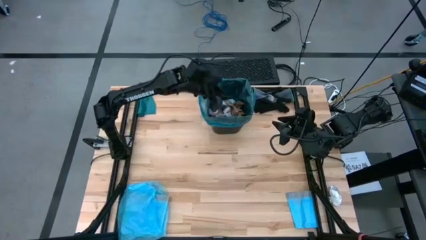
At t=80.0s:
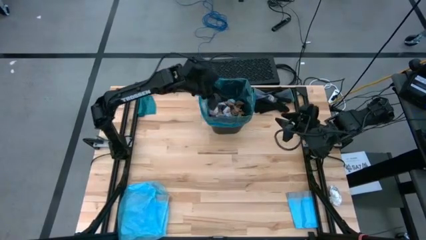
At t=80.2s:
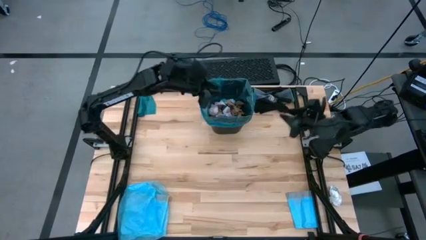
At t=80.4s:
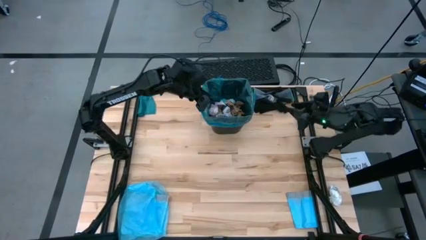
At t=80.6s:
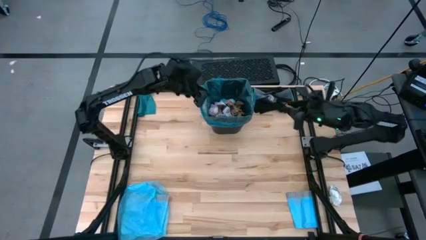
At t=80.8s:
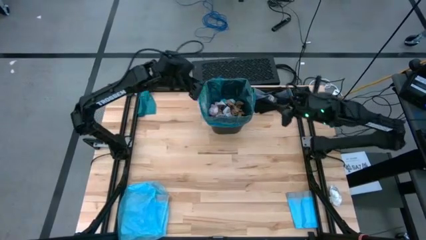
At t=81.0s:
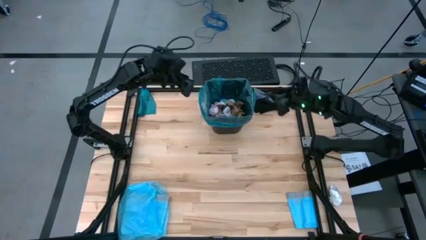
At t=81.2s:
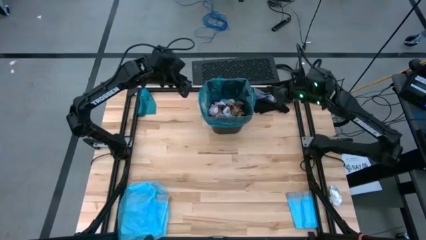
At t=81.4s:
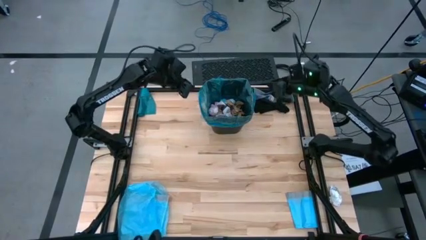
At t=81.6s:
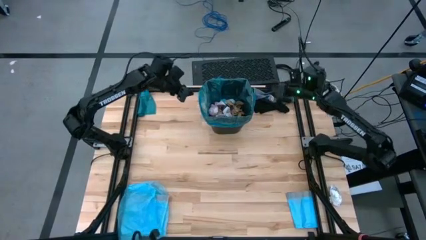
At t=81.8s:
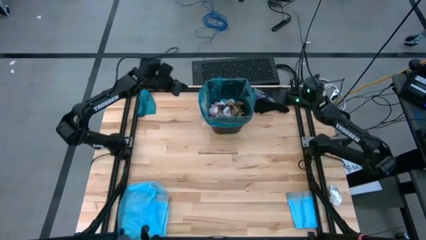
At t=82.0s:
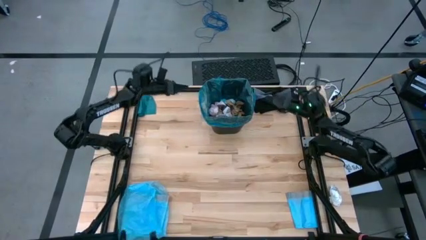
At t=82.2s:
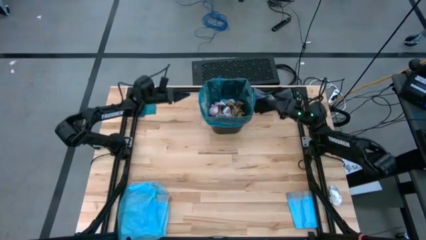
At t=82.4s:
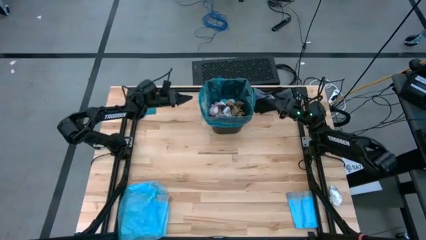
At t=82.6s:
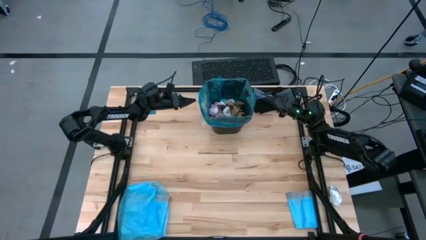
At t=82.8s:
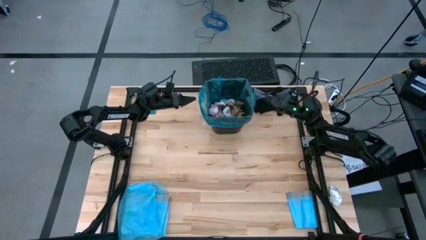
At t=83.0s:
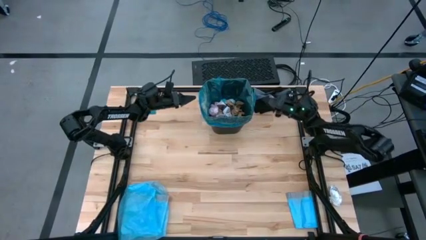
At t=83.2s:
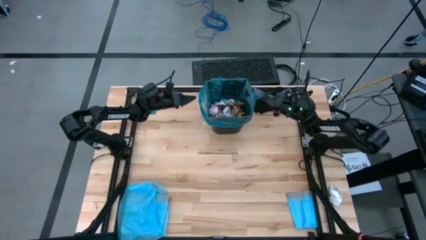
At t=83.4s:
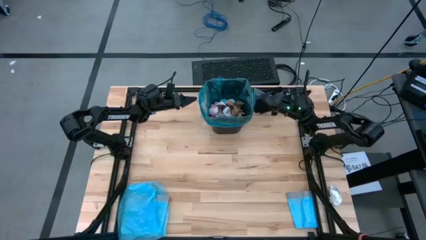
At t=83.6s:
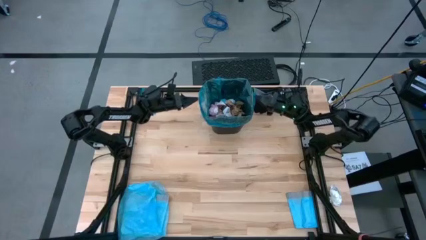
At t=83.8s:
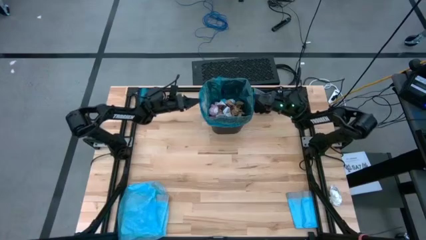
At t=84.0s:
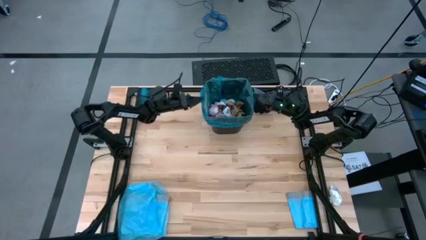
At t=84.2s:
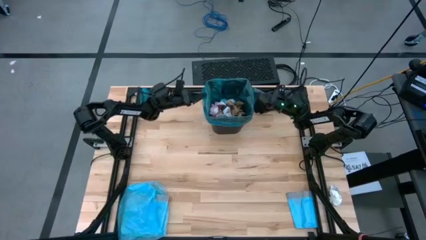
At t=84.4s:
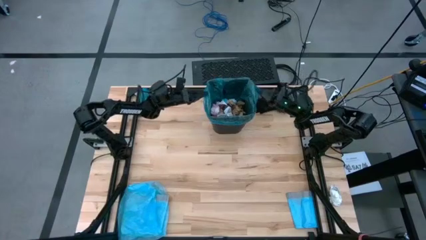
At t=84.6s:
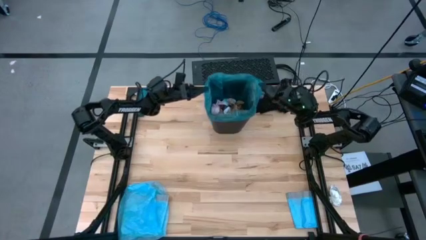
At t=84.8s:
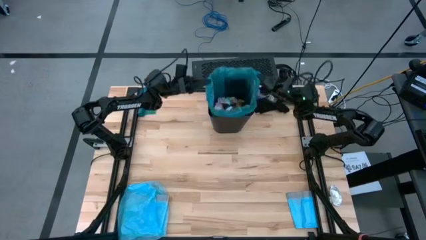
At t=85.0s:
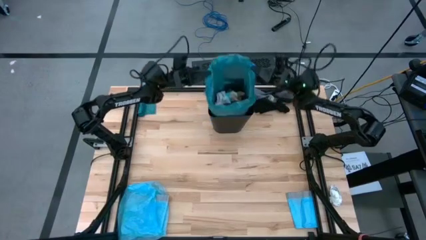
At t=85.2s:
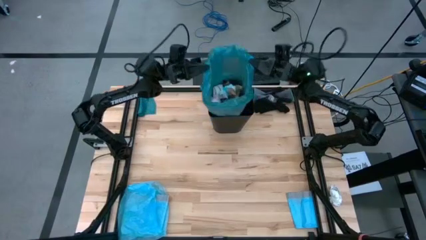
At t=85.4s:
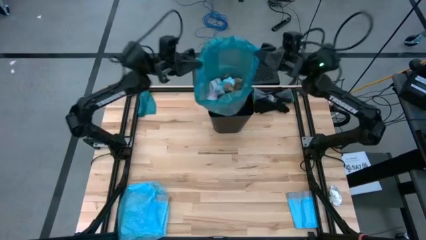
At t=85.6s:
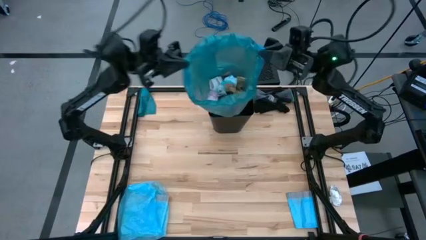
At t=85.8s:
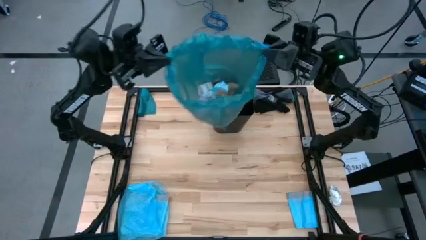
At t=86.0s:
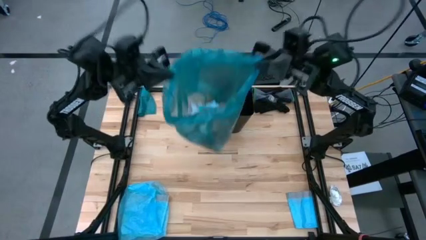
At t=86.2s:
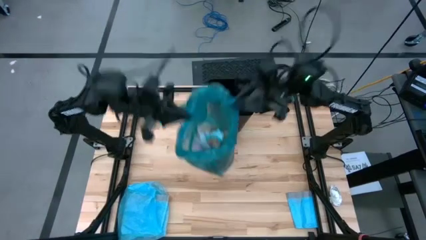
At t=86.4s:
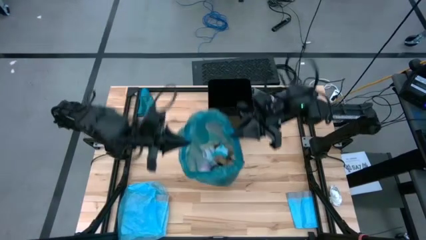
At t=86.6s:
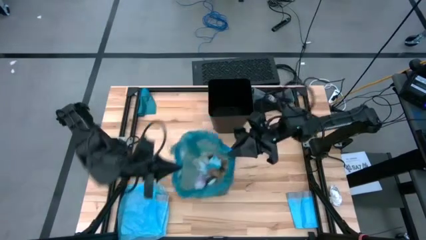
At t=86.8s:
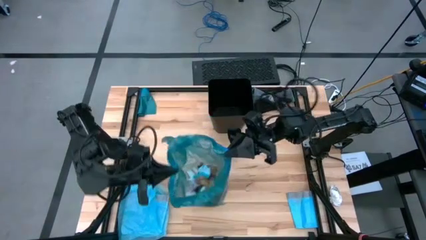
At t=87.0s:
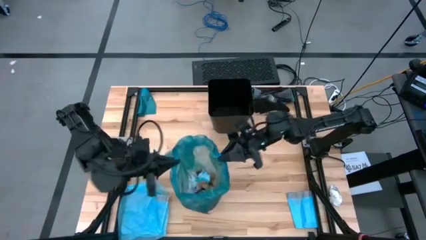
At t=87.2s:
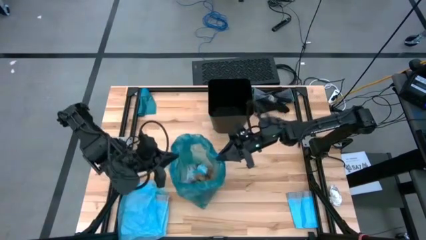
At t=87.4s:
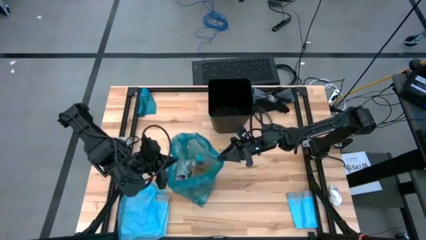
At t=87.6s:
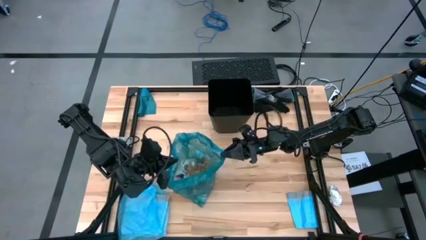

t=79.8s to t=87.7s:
Task: place trash/remove bag and relplace
Remove the blue trash bag from the black trash bin

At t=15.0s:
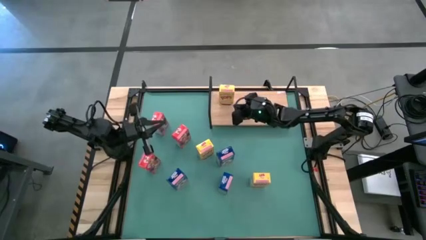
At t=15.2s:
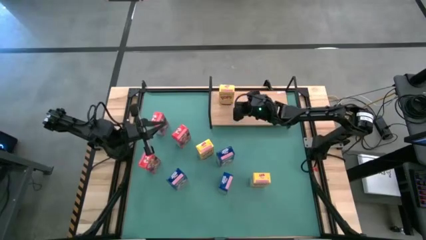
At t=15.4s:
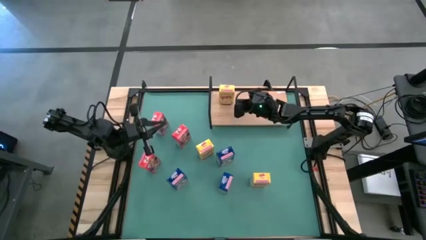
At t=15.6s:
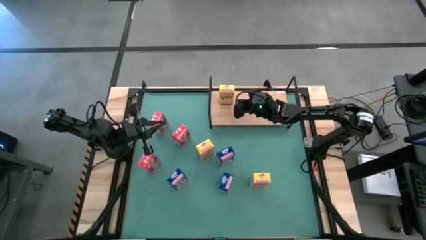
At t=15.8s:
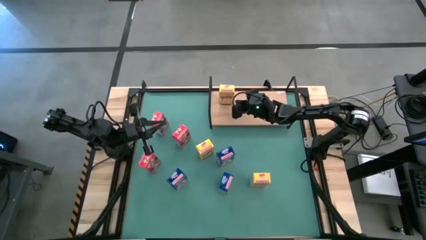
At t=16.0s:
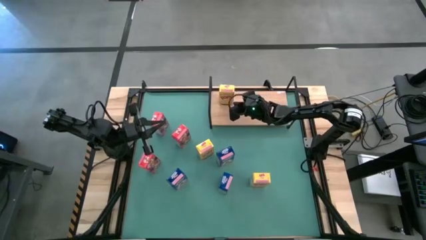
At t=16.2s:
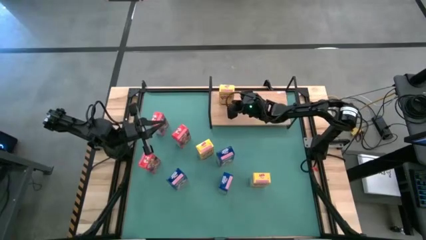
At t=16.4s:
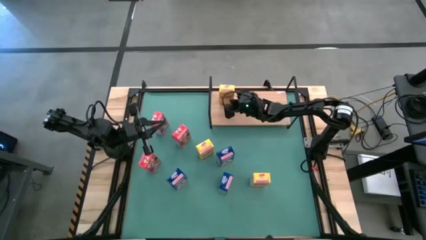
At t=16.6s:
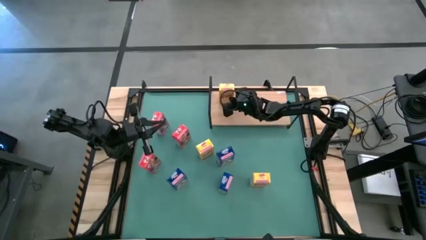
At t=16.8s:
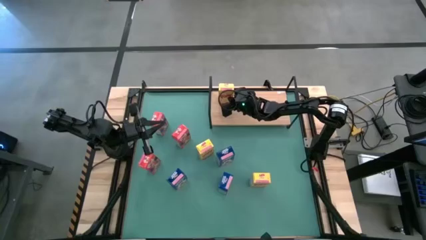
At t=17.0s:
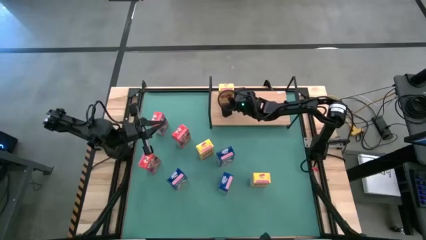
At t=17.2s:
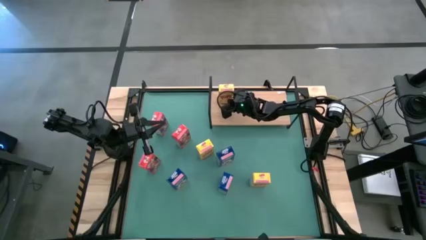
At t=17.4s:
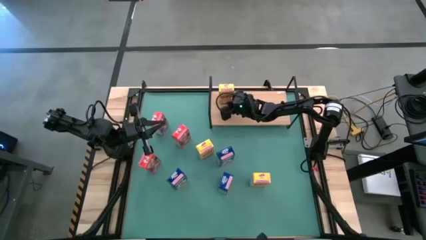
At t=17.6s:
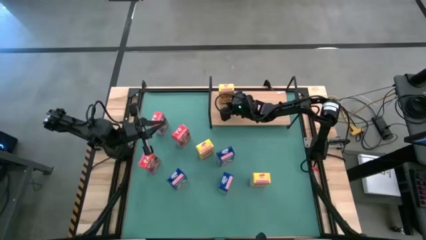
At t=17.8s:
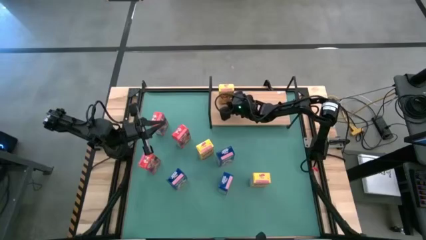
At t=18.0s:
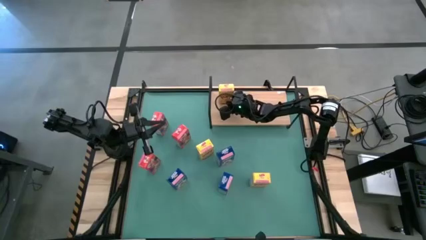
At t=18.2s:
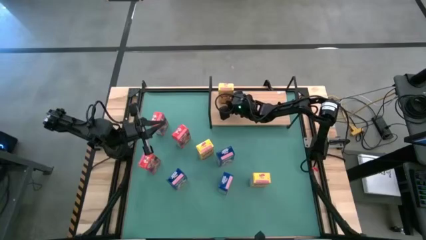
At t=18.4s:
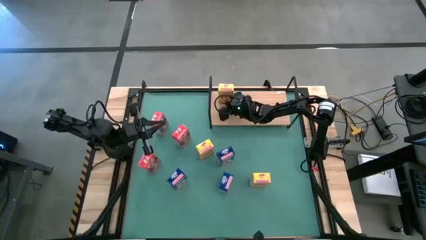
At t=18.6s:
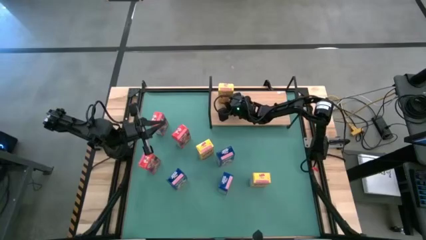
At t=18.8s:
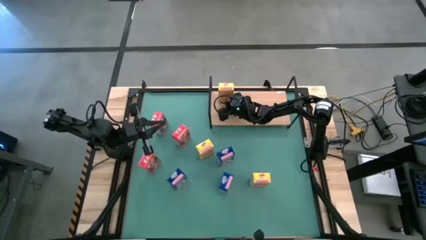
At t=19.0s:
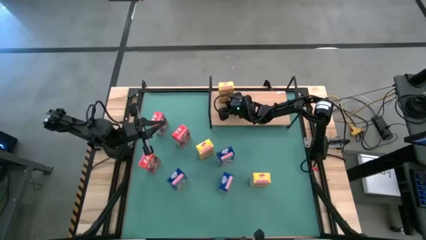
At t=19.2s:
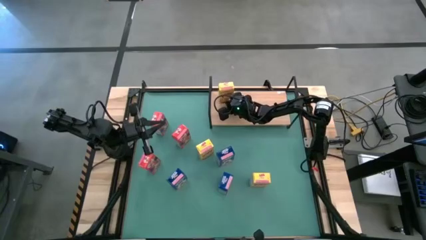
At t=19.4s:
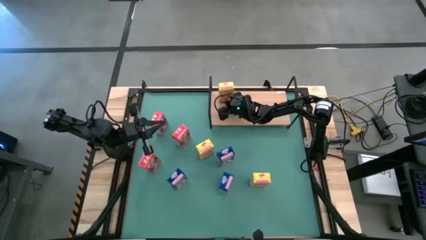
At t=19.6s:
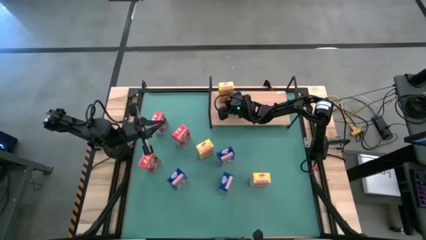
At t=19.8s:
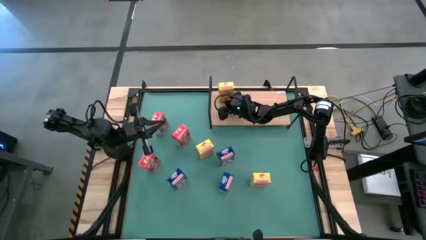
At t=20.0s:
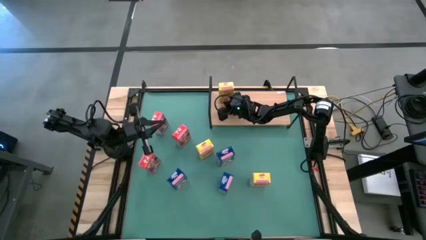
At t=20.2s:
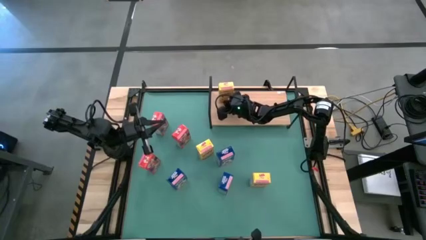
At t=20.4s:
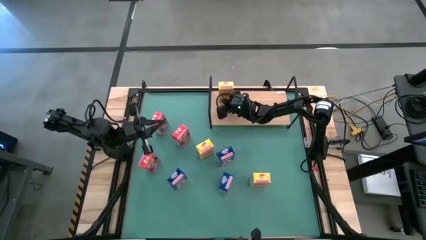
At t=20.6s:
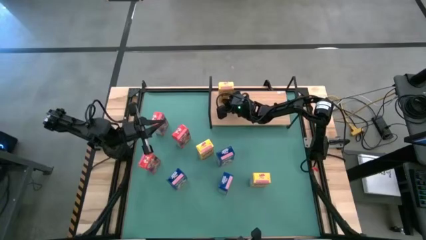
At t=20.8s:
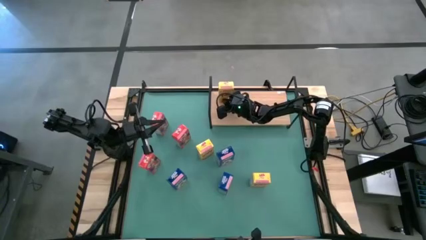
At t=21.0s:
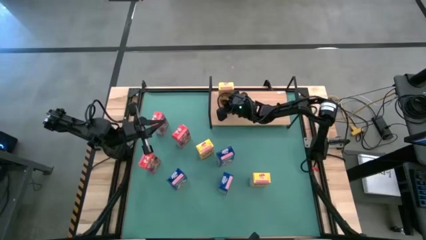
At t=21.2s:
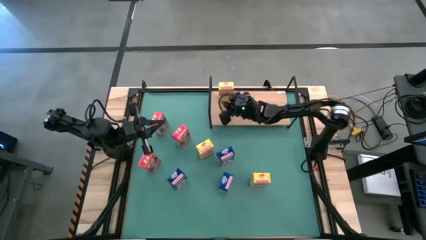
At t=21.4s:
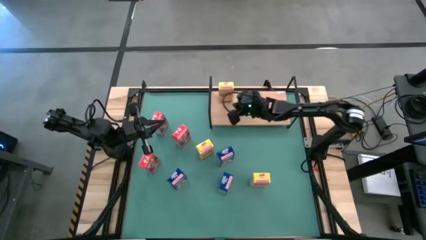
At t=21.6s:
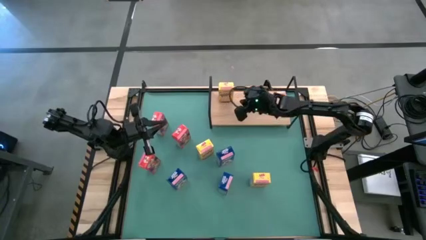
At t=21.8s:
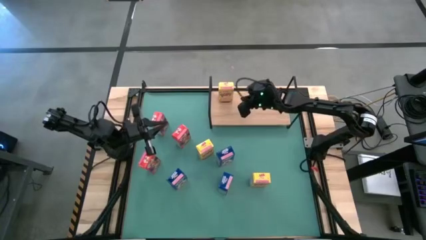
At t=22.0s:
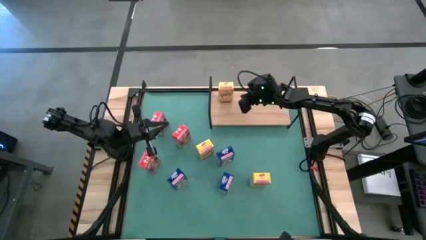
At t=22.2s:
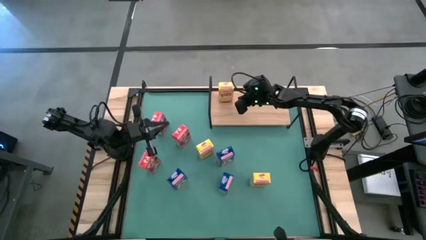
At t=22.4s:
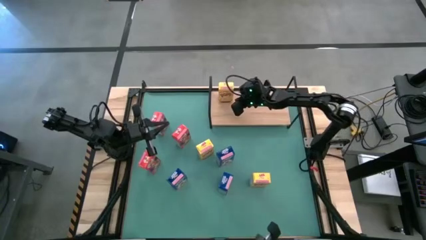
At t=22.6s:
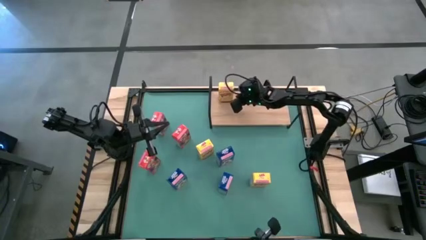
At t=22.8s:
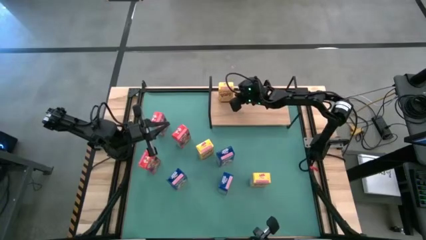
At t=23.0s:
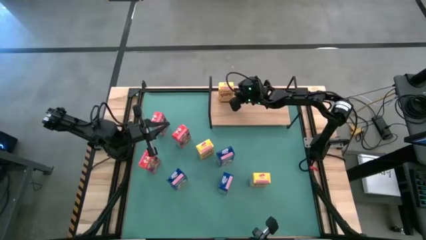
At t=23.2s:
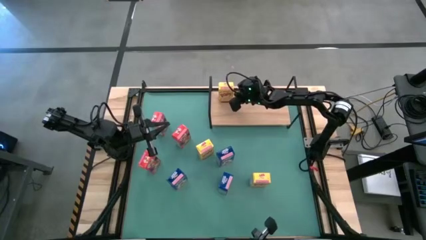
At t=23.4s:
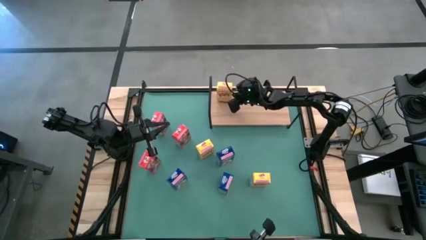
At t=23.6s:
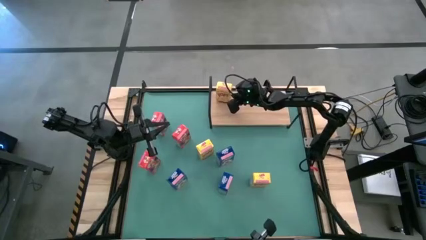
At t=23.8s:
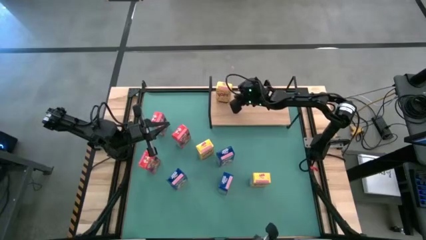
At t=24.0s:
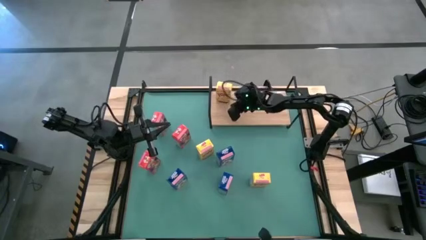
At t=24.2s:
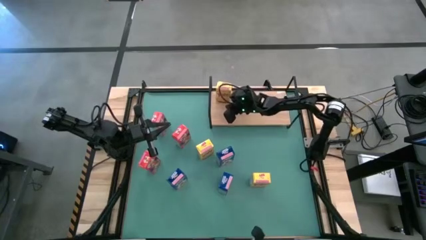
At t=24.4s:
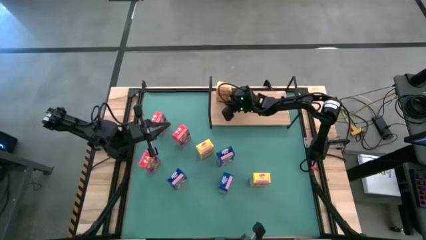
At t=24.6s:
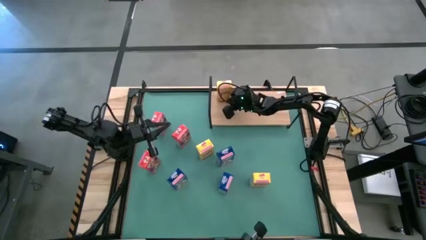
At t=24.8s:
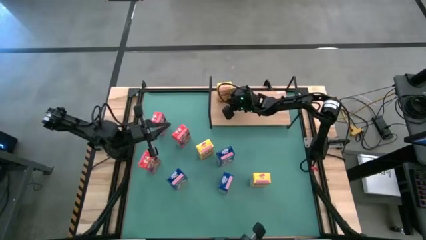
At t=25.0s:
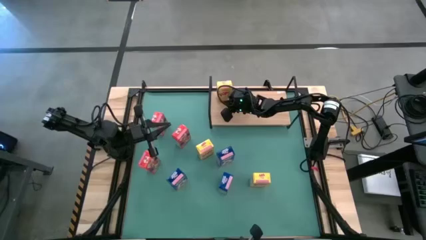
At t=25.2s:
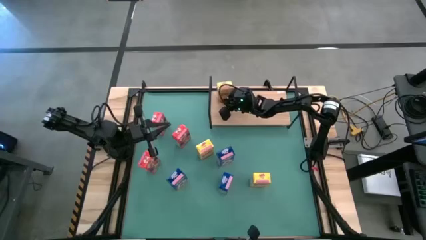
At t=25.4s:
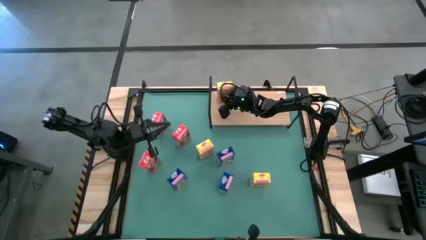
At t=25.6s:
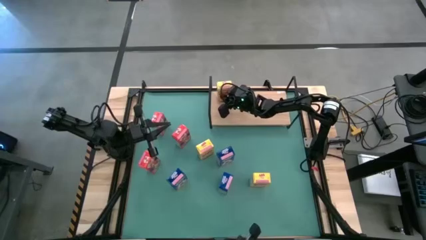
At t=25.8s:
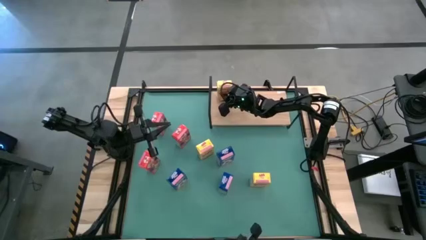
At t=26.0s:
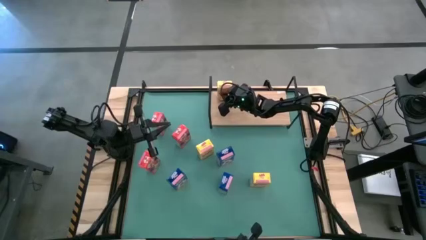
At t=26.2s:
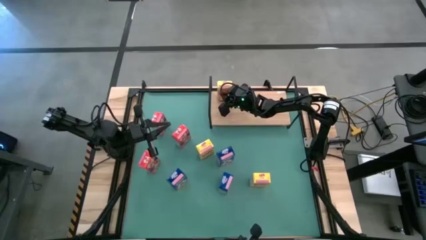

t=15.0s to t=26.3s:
Task: Stack cereal on shelf
Put the top right yellow cereal box on the shelf
